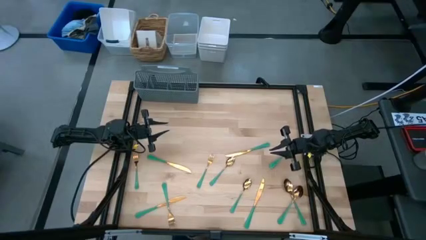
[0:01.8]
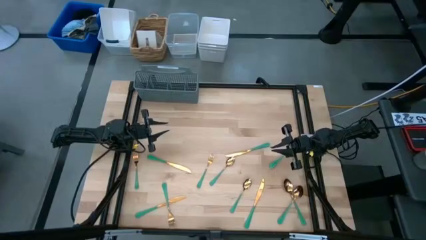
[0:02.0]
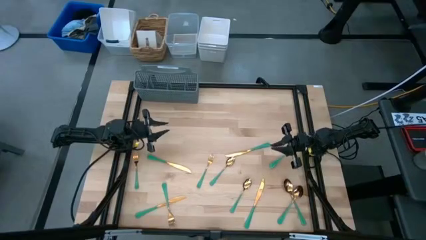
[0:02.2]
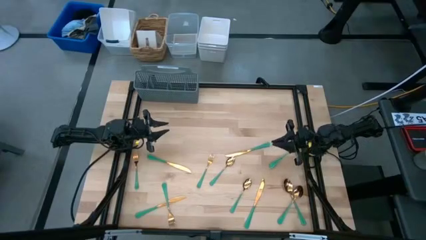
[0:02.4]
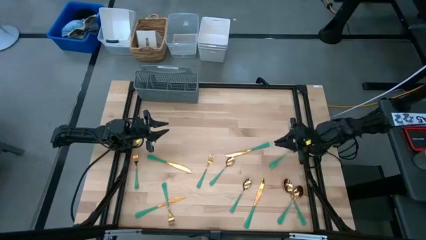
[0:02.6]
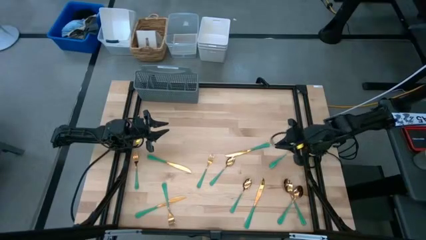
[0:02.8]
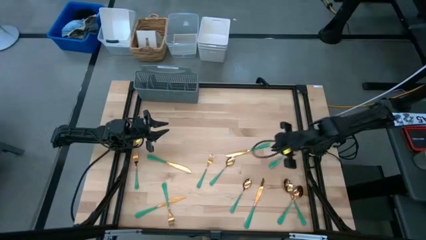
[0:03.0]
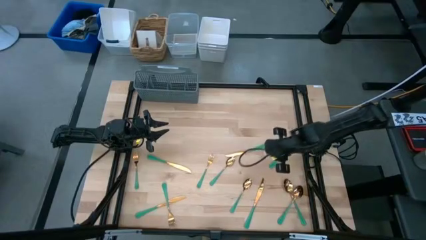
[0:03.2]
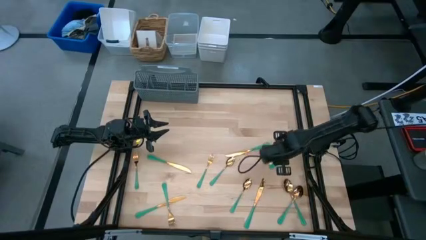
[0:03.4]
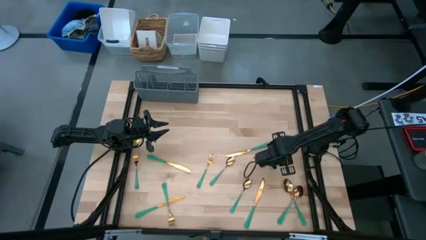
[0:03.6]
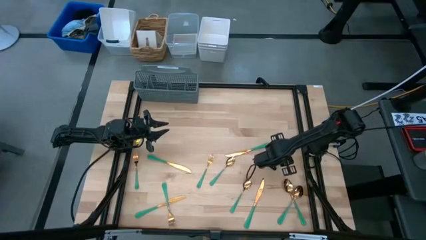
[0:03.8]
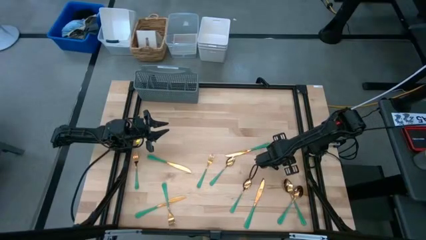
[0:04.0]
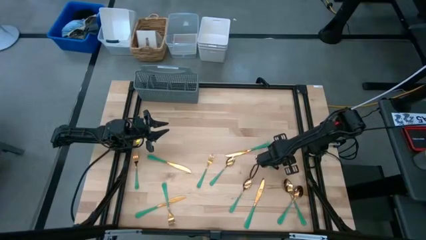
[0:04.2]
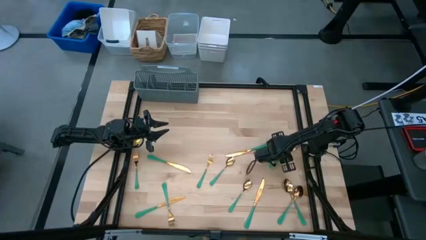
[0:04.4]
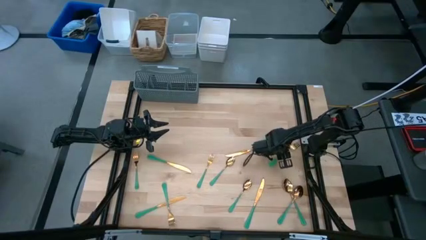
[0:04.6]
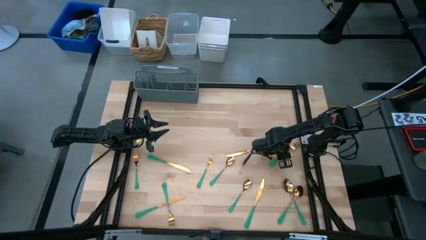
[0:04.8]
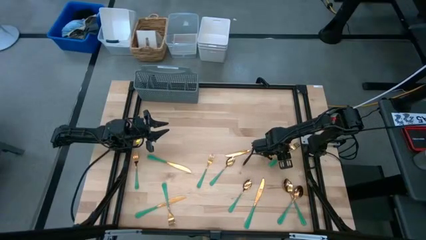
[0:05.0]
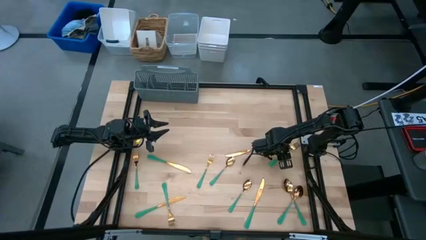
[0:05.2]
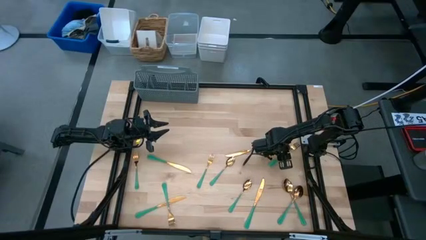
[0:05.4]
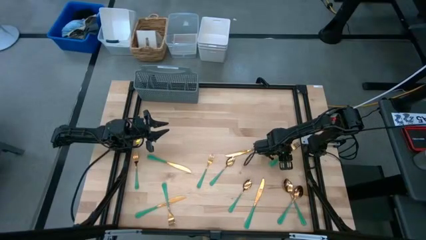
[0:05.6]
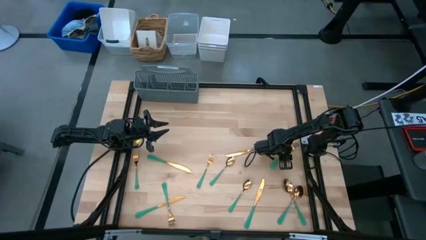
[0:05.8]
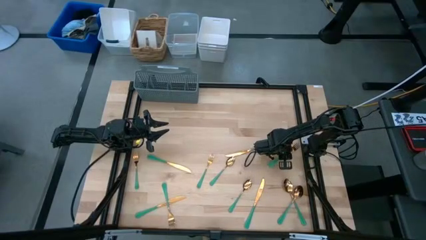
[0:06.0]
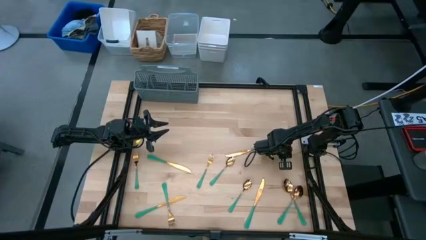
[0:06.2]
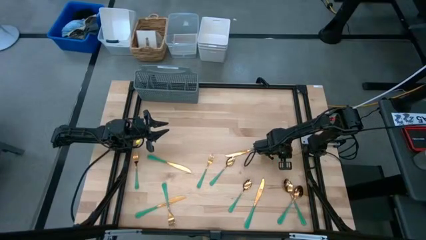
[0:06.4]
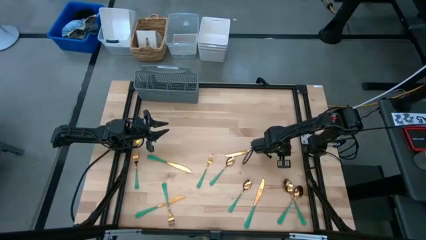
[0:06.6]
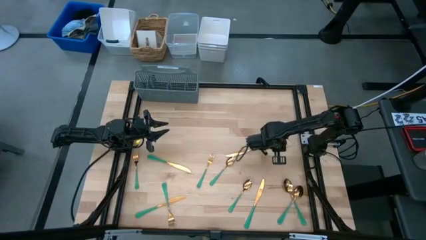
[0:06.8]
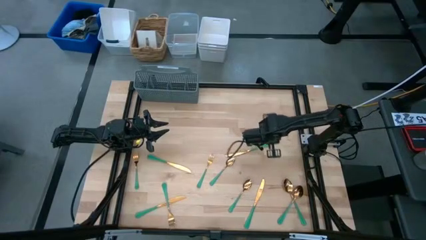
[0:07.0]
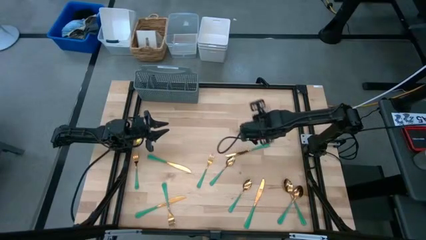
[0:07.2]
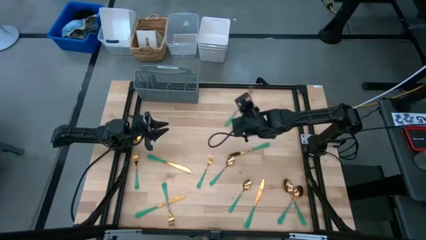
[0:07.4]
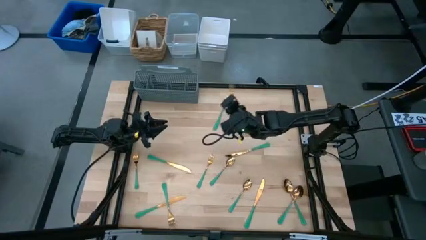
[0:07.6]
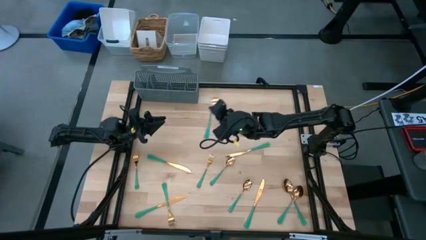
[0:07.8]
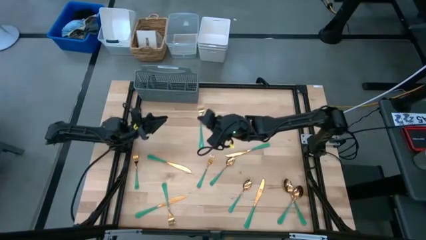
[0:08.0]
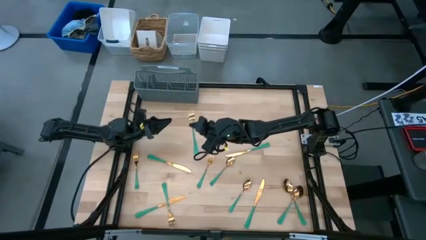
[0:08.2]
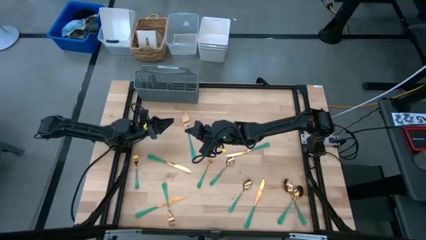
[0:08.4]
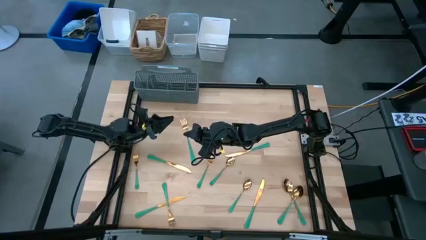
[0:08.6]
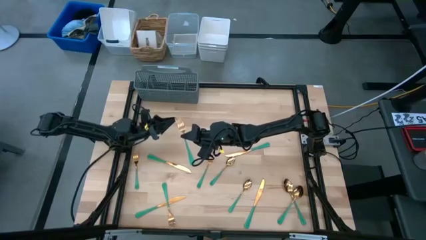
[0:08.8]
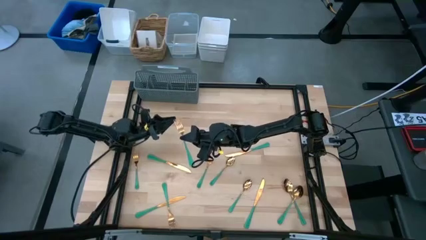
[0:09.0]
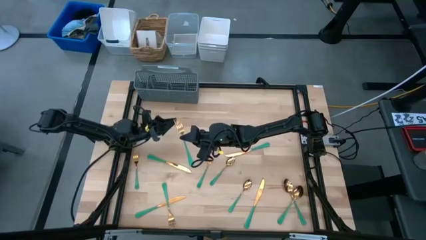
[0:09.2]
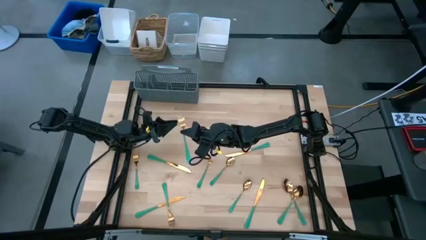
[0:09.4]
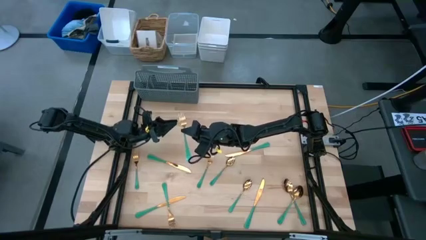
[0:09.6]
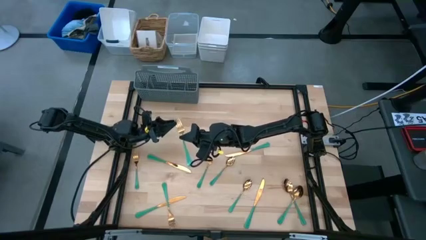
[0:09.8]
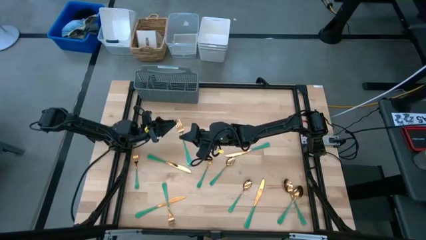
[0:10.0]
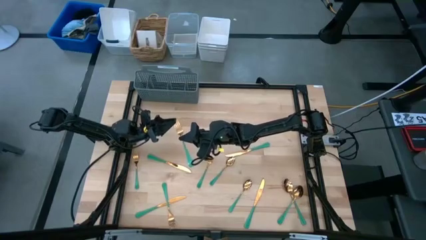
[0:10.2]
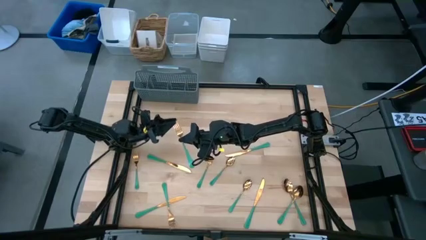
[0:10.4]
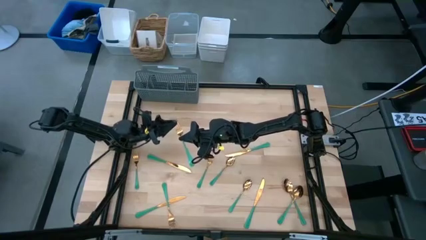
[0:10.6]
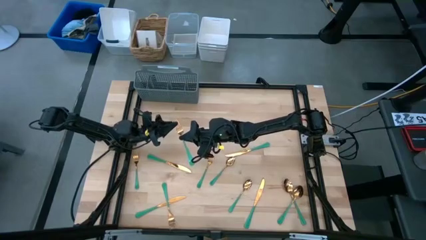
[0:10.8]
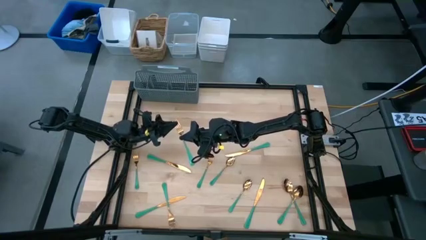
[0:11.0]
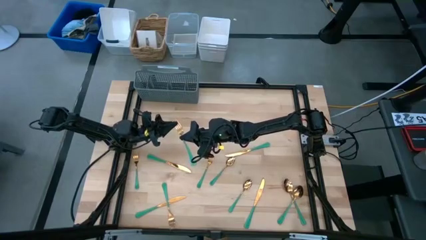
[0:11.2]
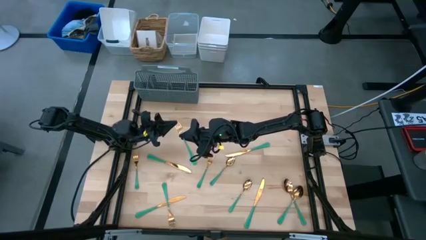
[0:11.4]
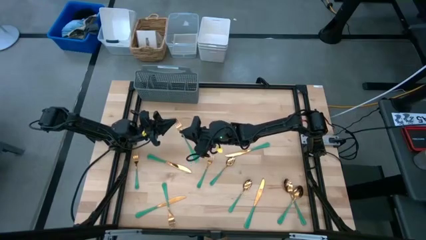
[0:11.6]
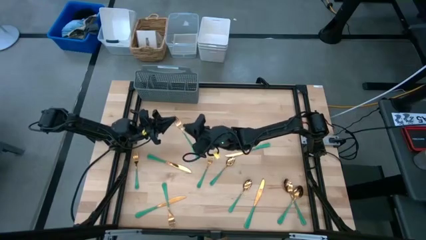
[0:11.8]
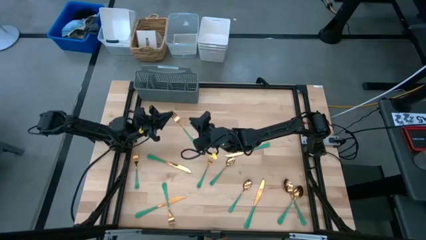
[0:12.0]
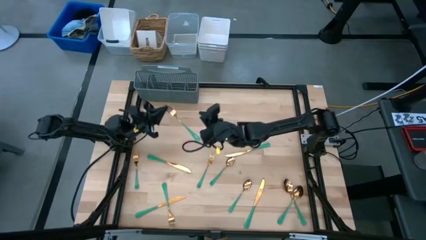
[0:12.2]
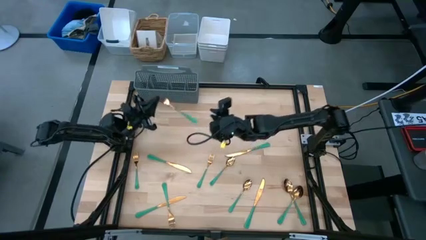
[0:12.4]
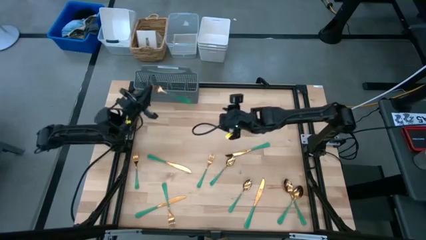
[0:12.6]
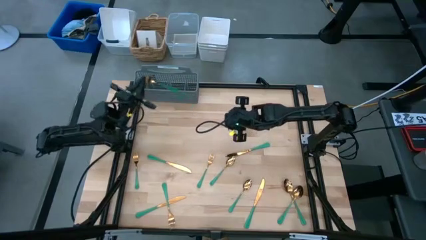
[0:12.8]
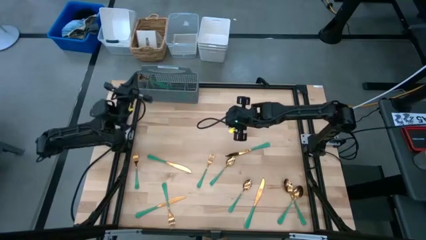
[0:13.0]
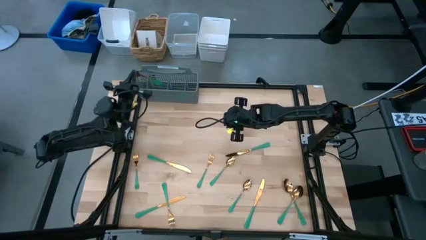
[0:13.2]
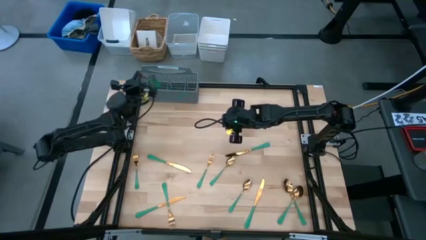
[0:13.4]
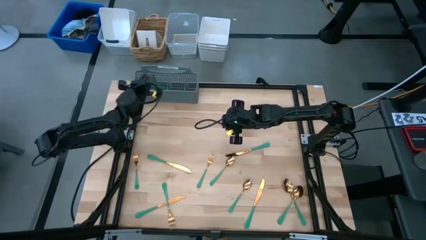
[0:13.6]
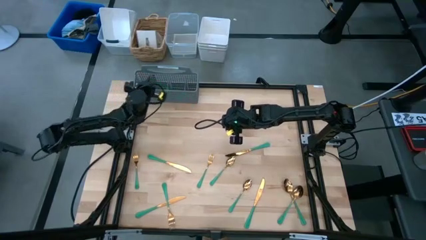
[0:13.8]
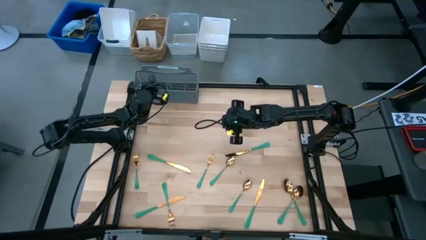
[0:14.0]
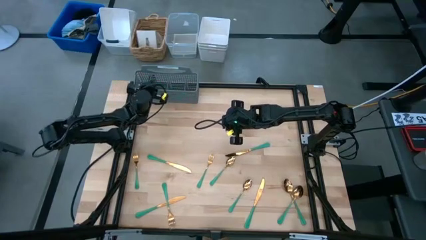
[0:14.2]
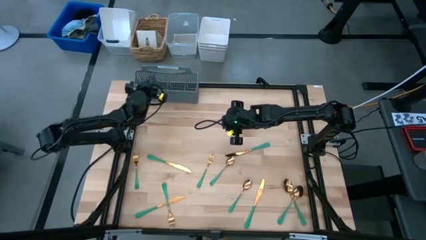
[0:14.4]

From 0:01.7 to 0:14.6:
Task: Sort silverware
Put the green fork into the gray silverware basket

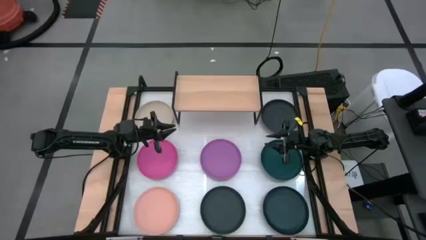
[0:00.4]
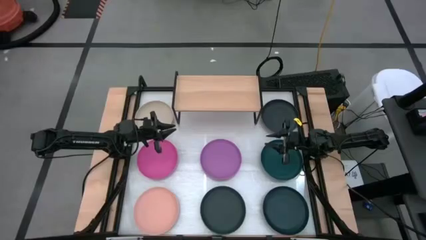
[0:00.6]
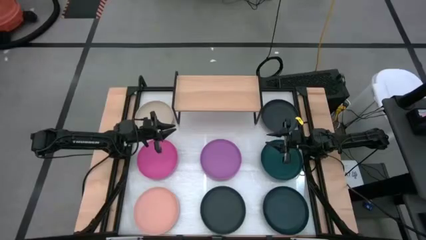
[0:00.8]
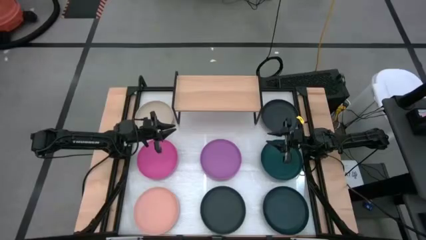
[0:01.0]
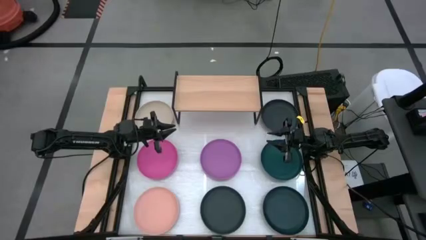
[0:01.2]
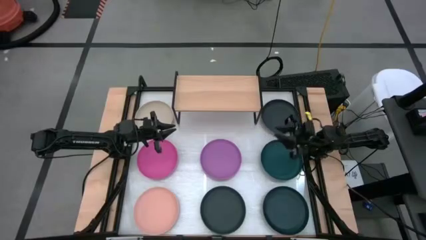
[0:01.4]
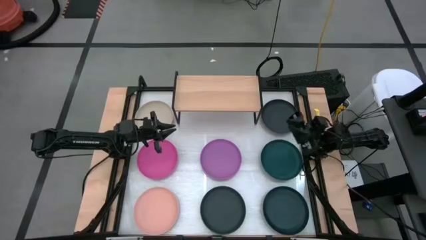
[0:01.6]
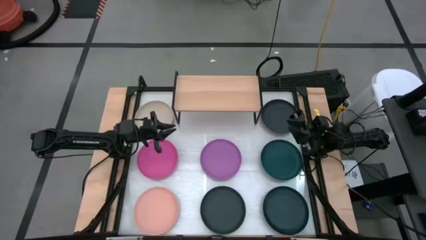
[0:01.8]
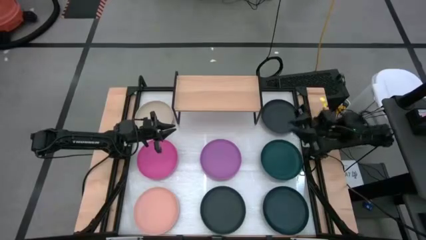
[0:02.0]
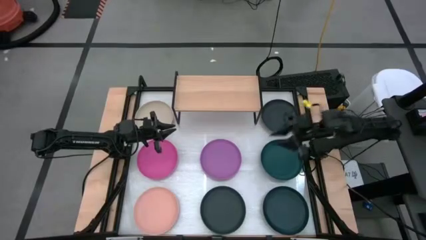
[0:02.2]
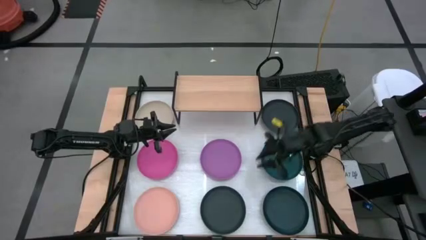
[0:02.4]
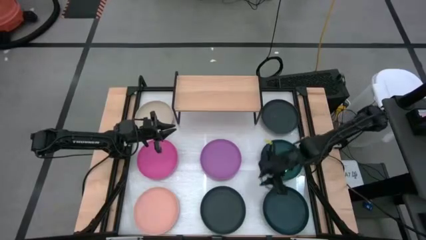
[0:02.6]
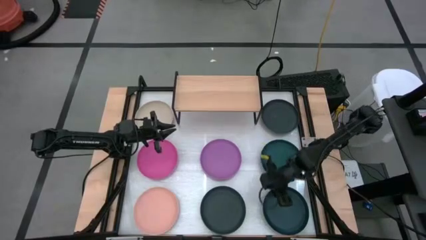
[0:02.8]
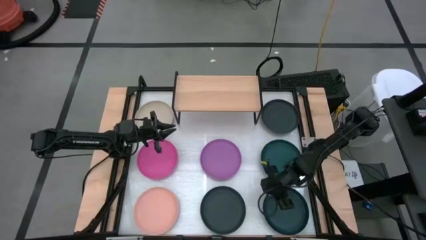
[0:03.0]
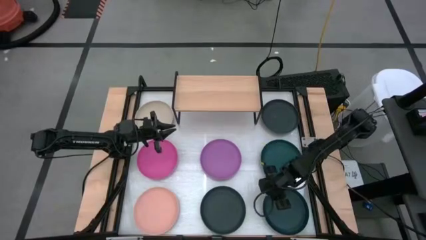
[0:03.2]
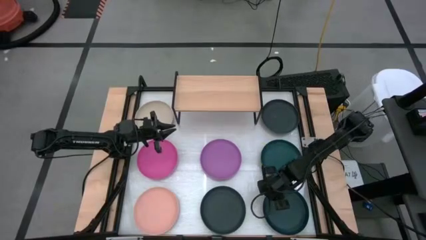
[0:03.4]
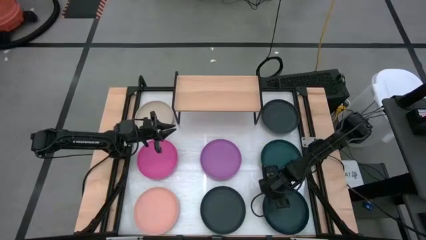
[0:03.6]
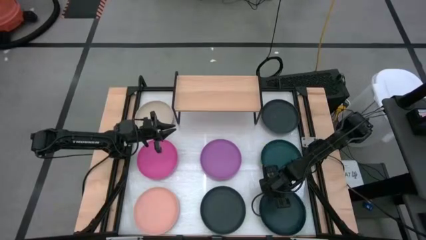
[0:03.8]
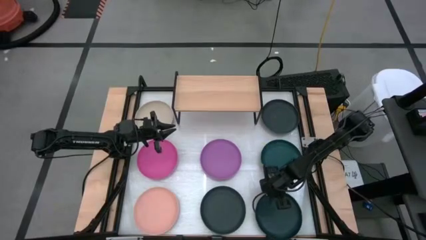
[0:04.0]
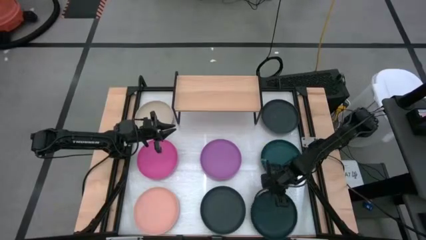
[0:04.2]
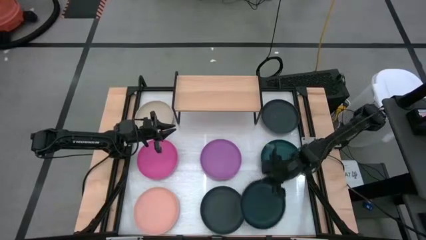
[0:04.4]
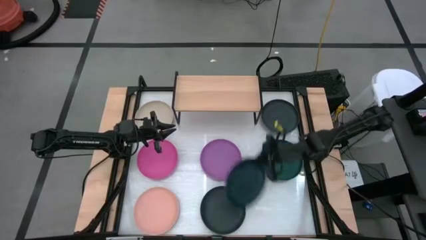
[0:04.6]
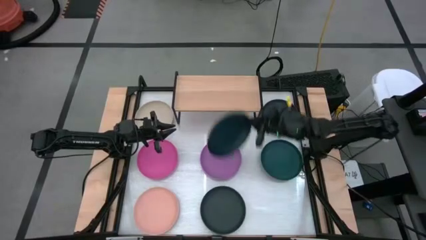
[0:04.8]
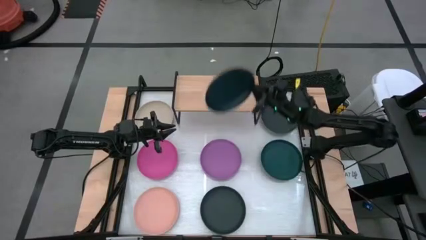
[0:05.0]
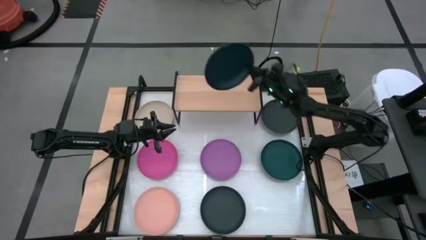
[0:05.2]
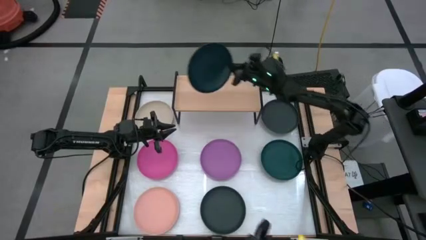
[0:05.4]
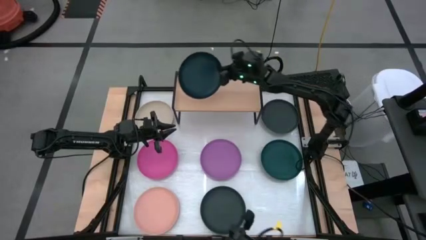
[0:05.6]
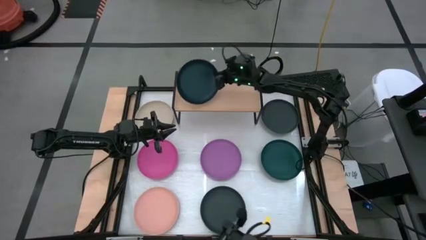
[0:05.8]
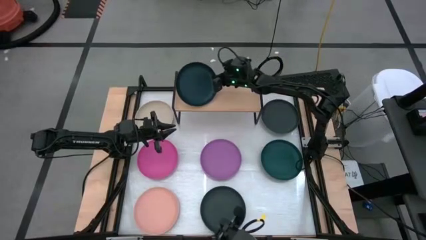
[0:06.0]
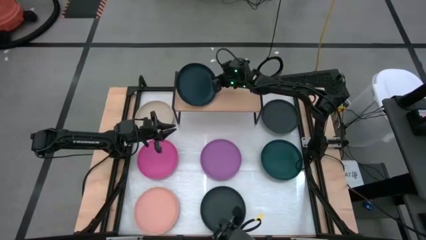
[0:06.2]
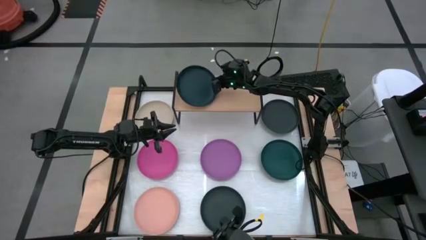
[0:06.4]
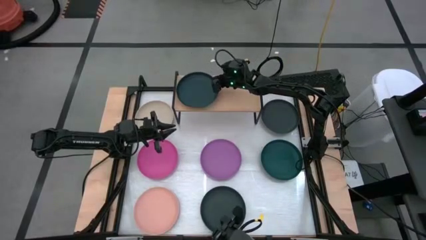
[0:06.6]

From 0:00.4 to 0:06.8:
Task: Place and stack plates onto a shelf
Put the bottom dark green plate on the shelf
